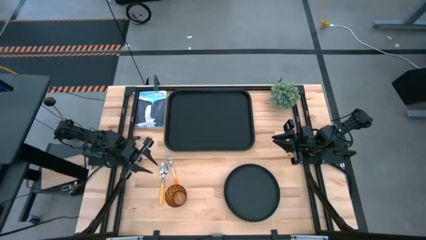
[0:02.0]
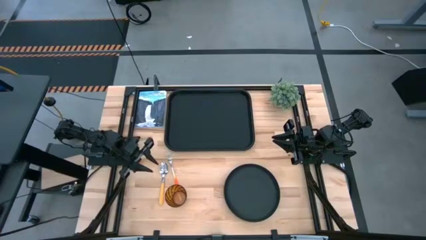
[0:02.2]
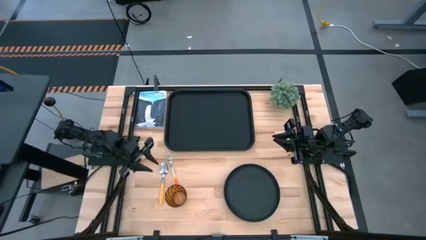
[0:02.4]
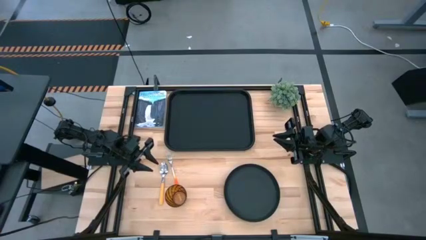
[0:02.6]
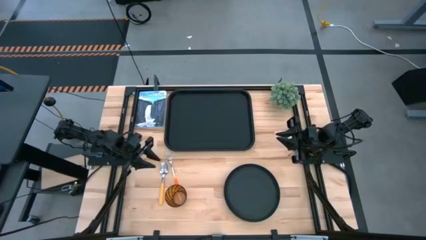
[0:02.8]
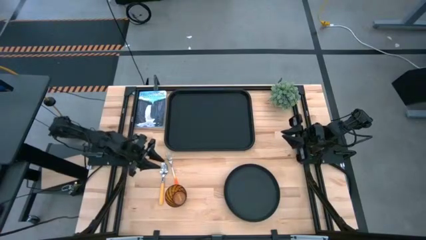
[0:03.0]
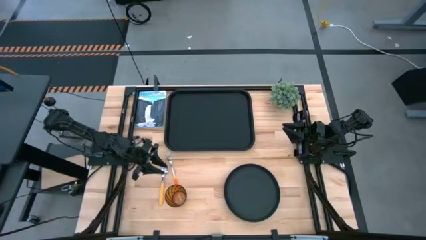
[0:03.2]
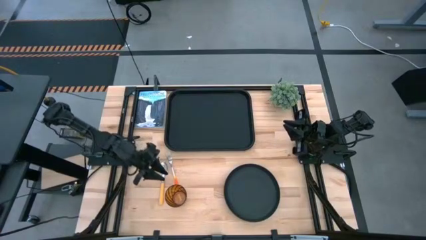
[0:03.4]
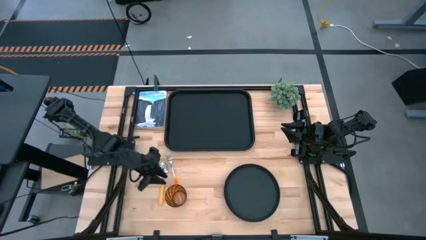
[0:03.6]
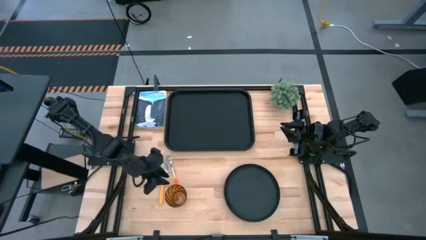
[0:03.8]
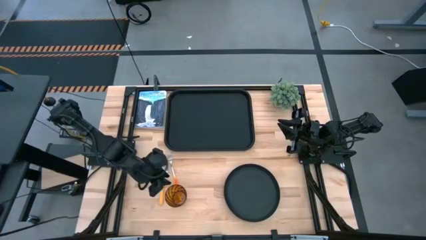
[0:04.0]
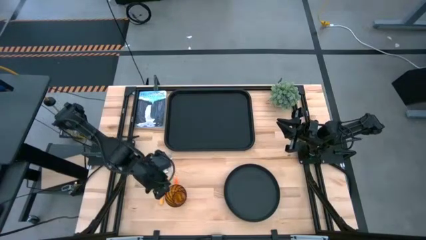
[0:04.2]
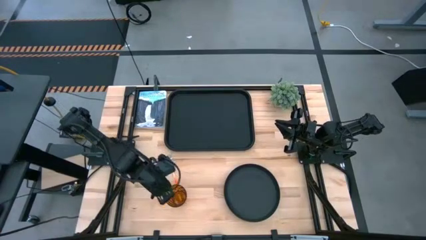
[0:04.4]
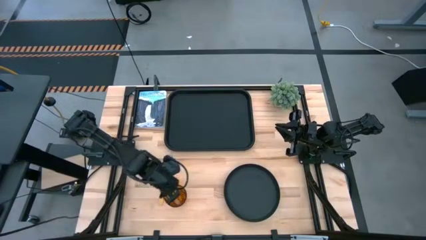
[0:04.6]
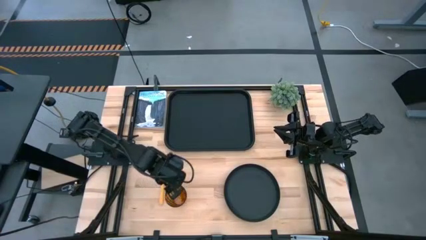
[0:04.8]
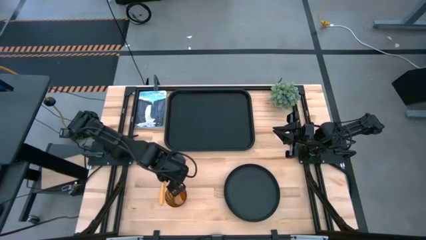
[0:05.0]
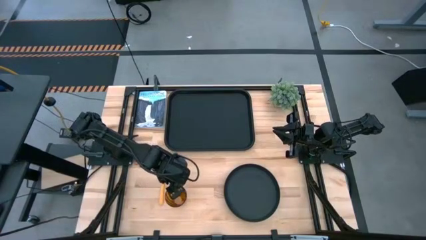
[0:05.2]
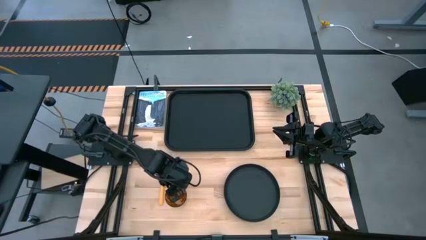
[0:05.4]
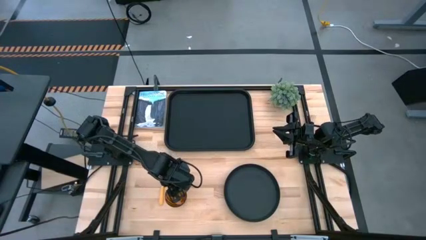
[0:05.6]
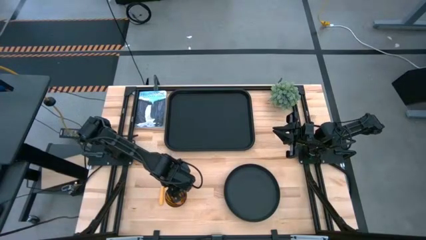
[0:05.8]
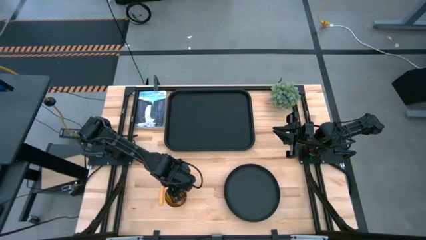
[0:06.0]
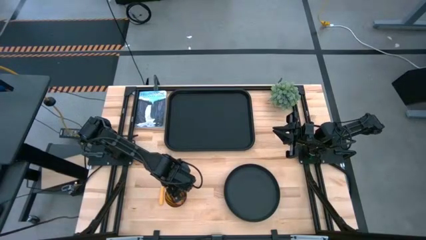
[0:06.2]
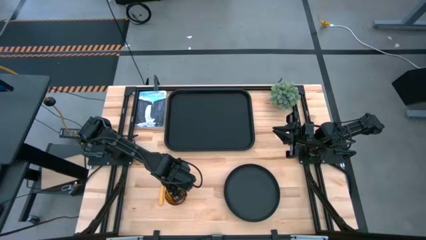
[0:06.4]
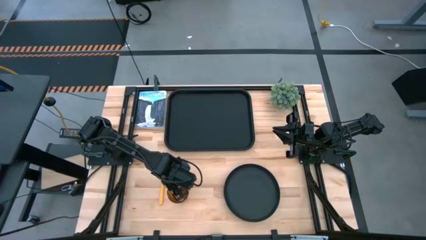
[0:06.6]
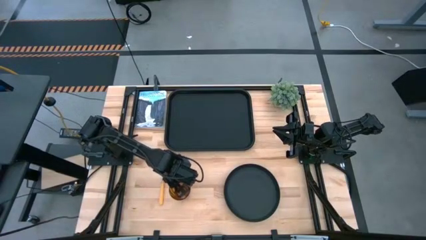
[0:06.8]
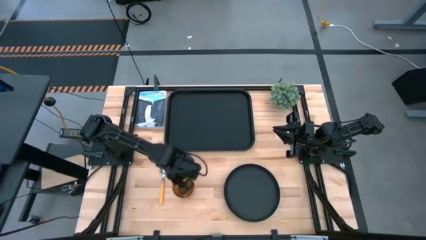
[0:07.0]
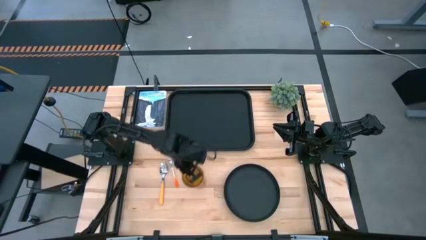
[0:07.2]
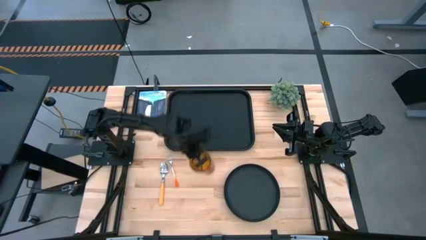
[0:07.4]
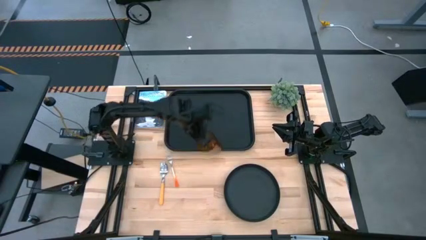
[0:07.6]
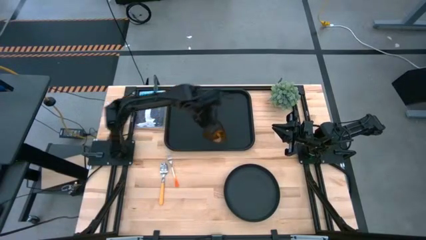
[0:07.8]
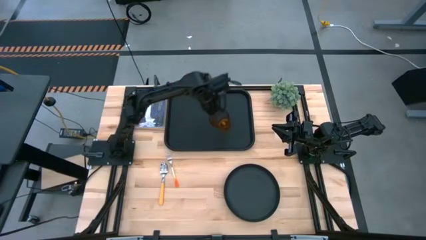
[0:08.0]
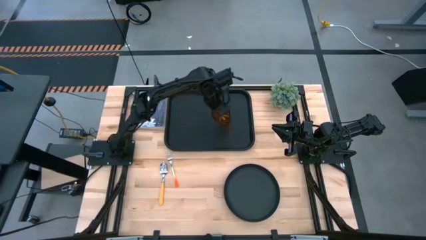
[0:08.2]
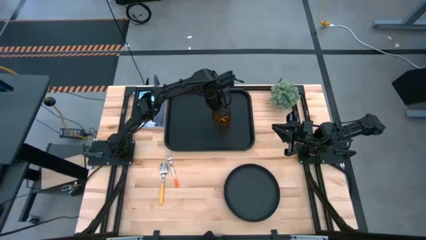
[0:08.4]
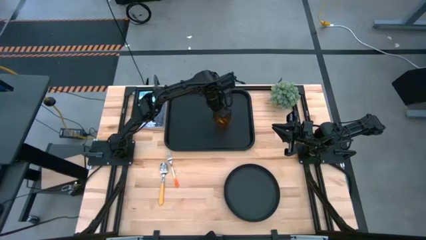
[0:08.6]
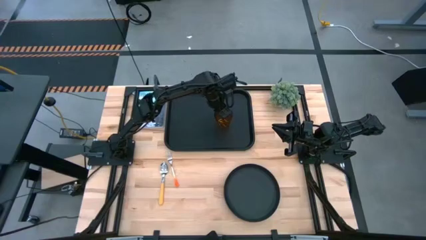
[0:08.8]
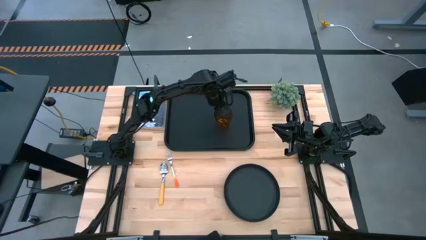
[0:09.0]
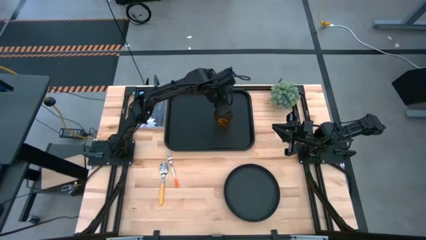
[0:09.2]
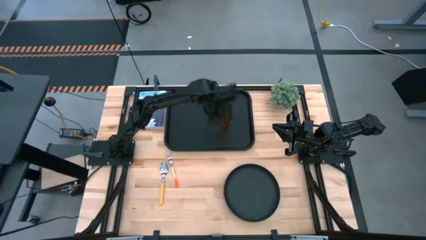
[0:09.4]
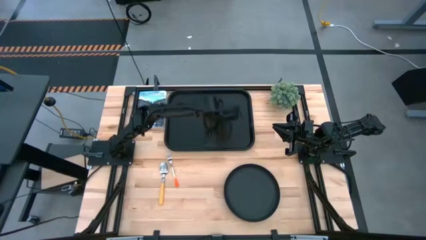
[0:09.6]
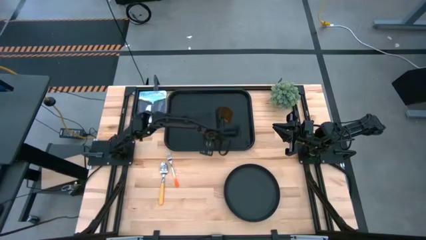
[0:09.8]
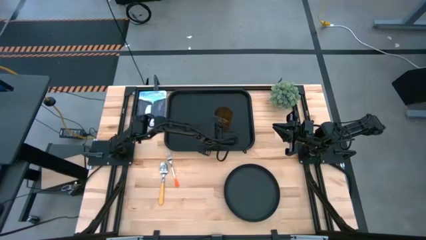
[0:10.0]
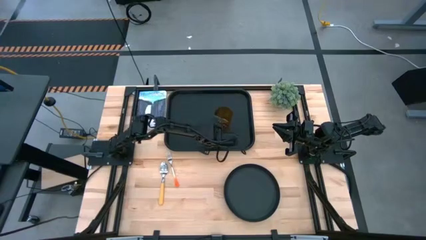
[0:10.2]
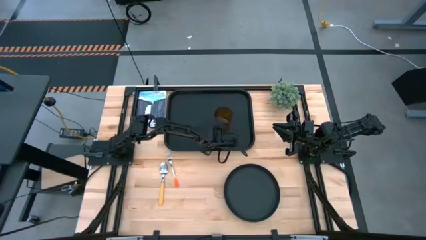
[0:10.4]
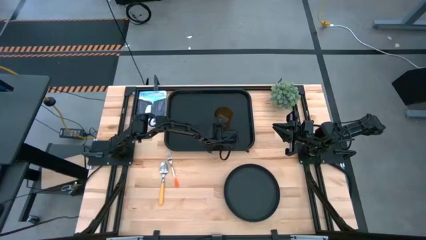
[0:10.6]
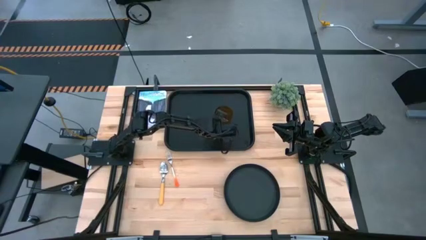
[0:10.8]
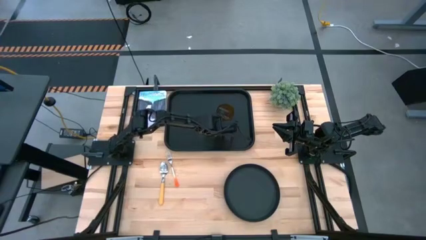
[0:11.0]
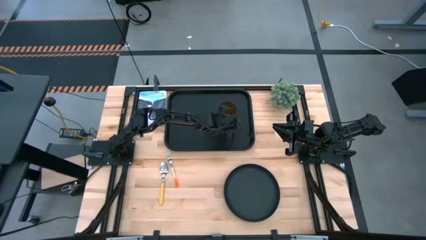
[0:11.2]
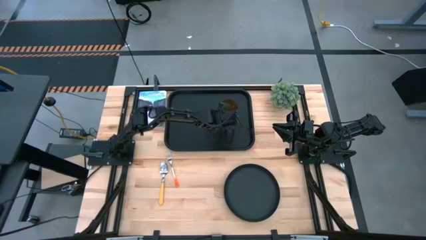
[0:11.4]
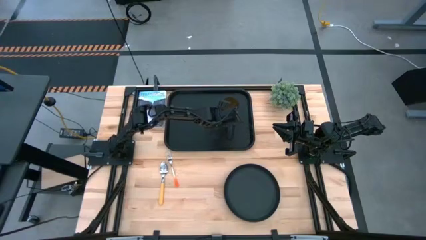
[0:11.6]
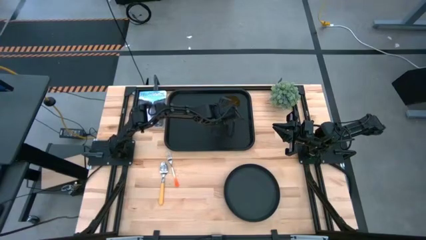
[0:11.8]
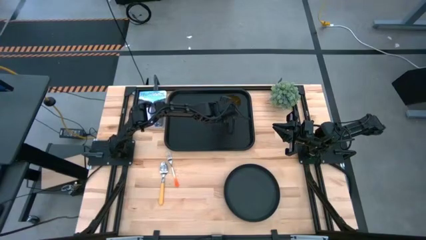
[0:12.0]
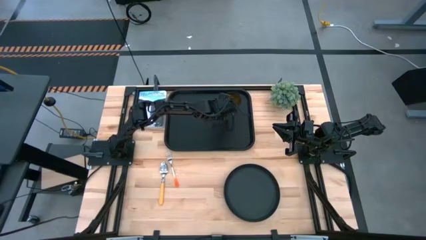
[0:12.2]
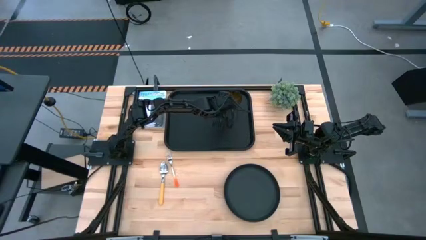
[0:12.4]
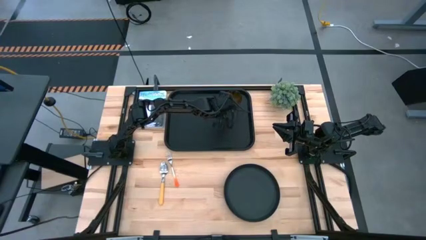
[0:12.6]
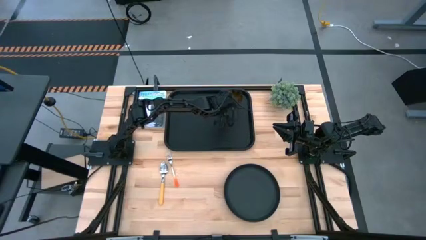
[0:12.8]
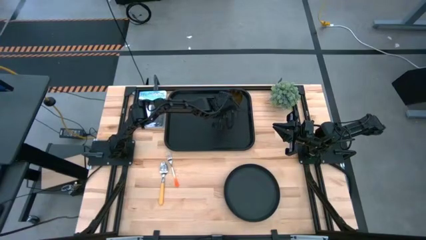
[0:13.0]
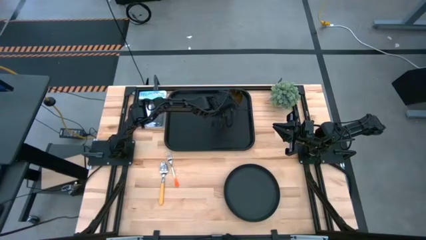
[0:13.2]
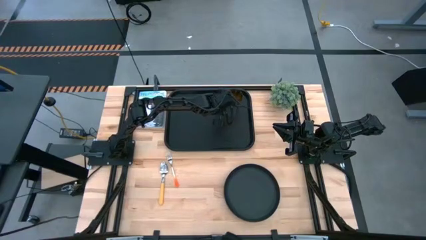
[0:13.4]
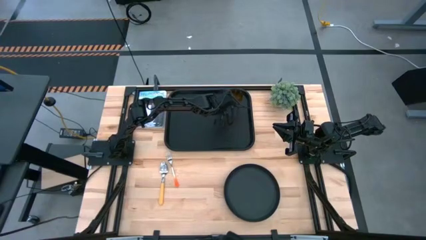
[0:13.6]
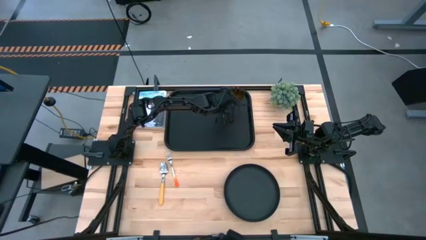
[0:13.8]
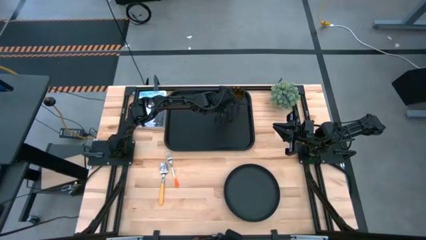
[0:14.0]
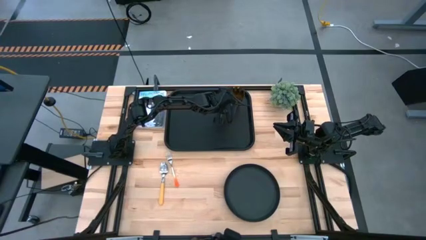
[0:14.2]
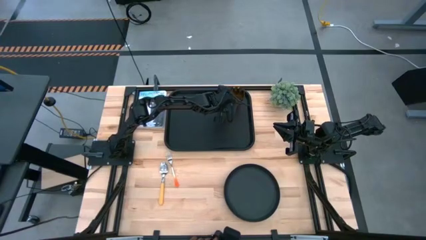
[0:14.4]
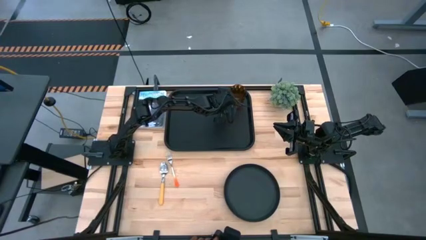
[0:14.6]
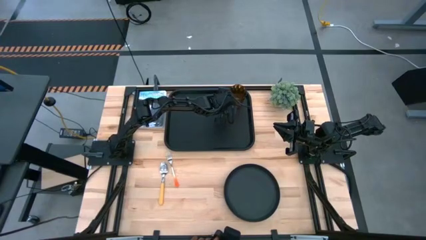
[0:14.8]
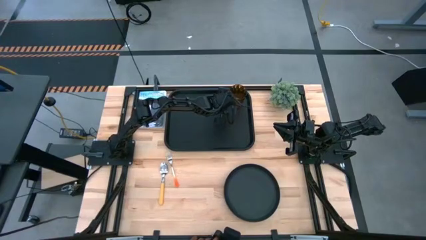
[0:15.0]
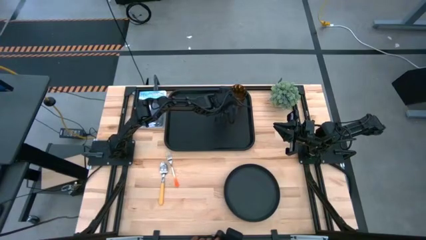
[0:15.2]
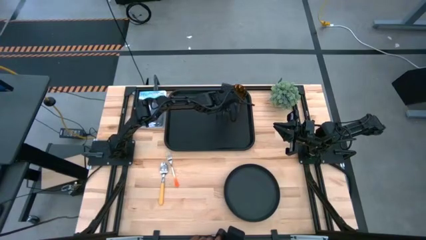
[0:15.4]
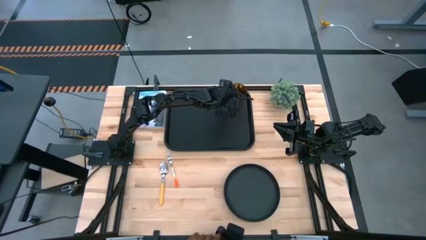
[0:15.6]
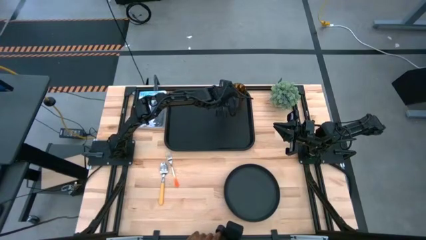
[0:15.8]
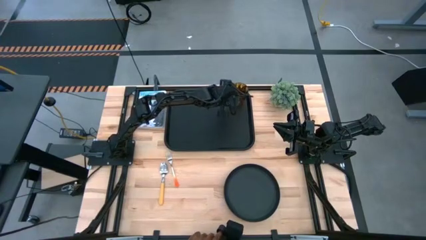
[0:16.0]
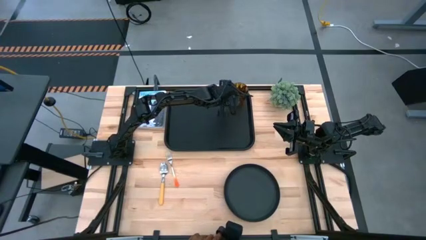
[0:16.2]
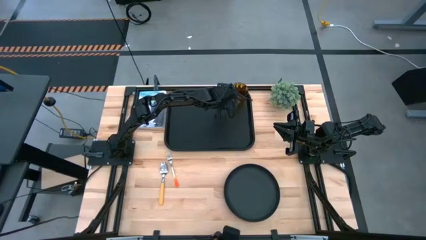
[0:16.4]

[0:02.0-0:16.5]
Task: Pick and place plate/cup/fork/spoon on tray
Put the red cup on the top right of the black serving tray
